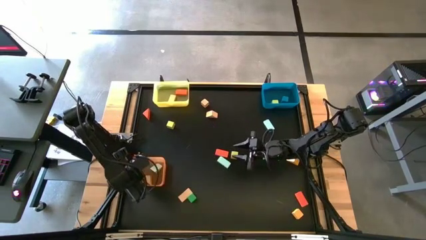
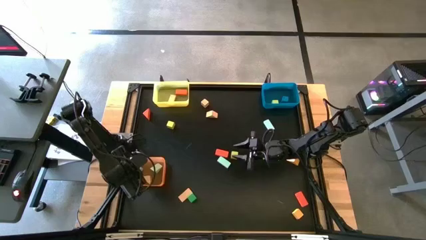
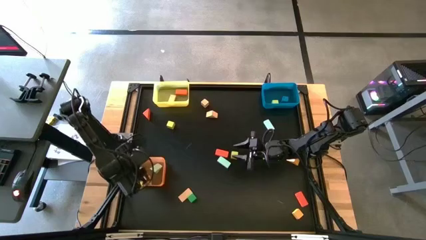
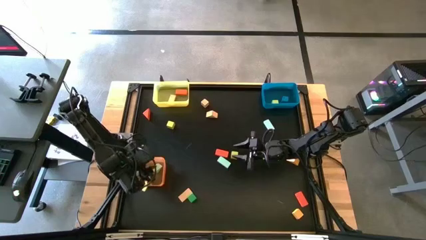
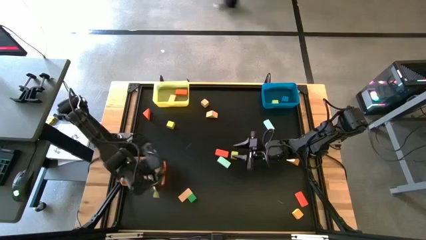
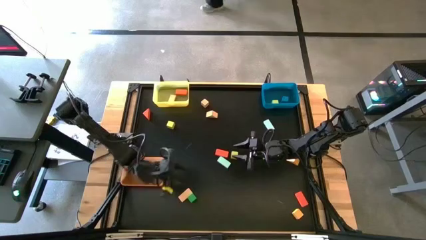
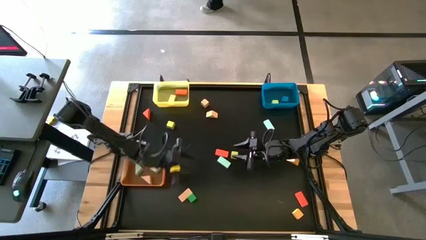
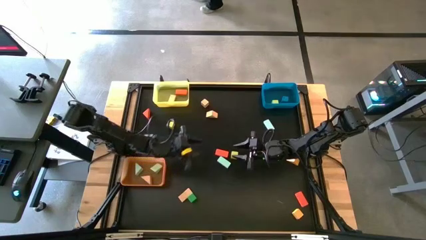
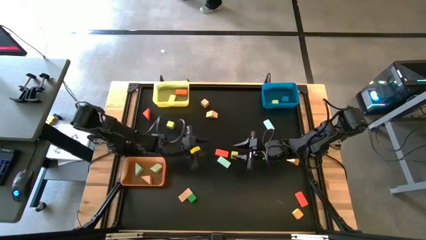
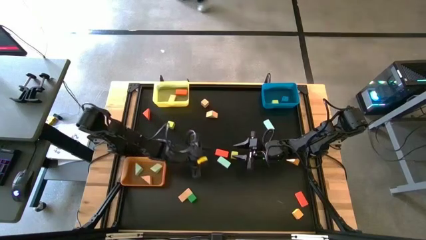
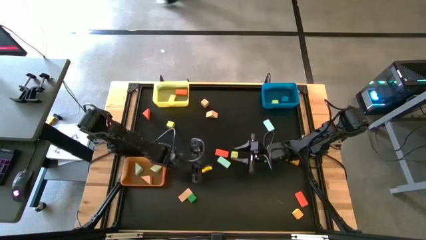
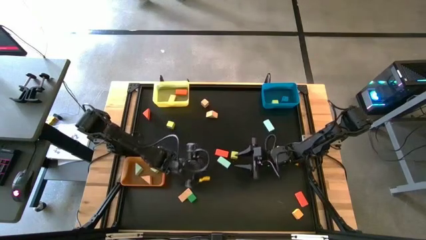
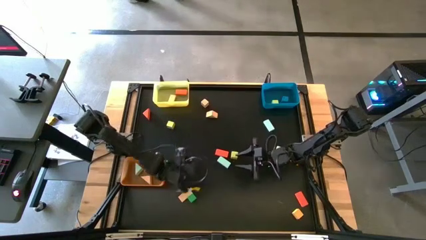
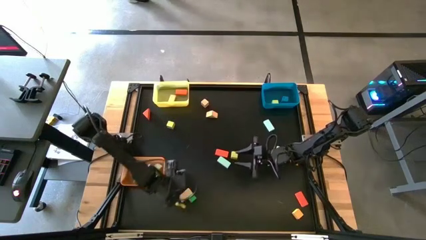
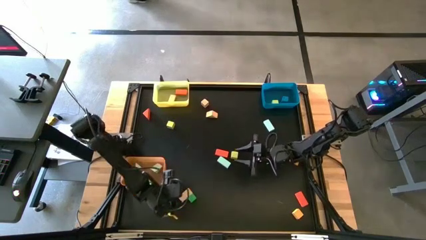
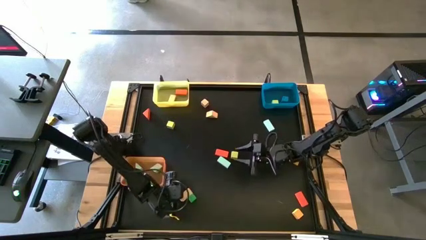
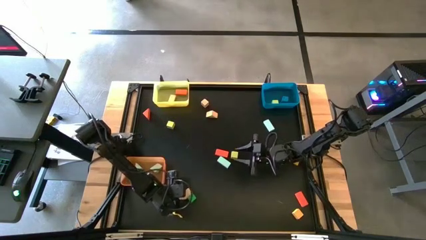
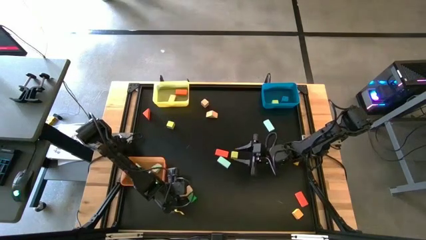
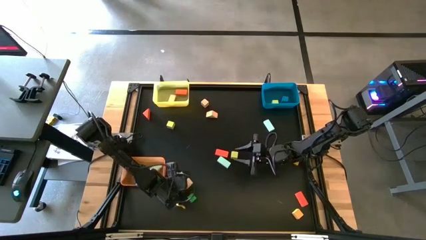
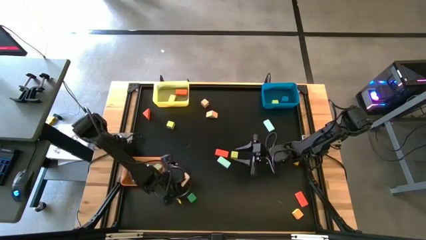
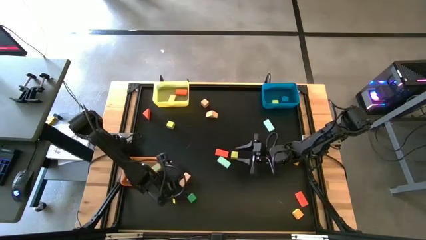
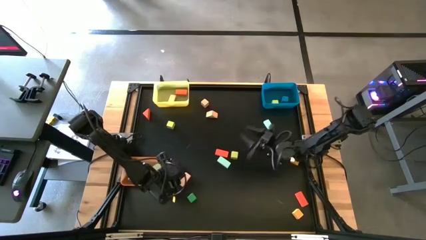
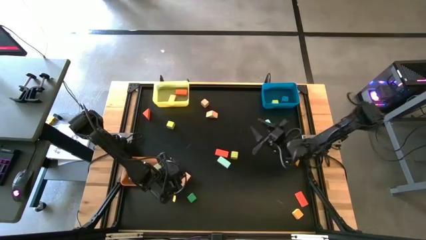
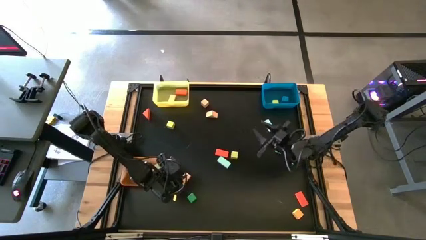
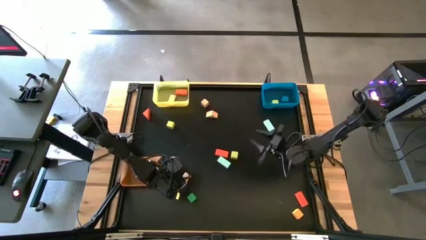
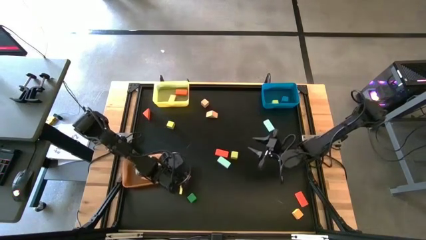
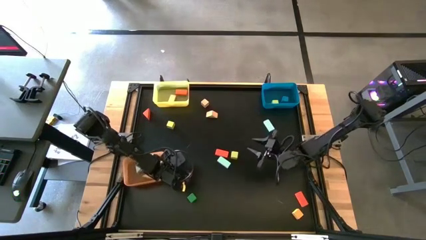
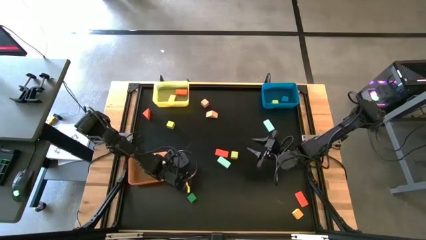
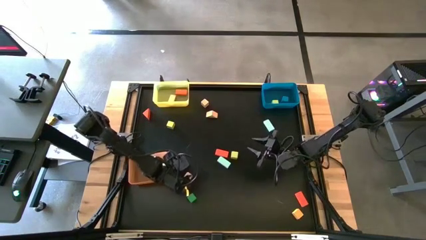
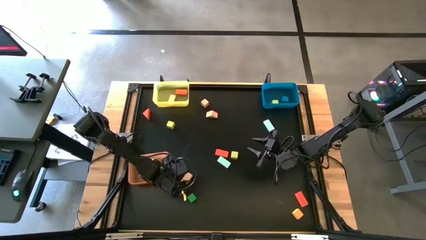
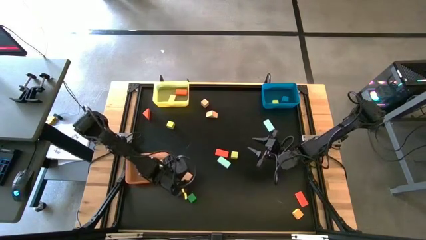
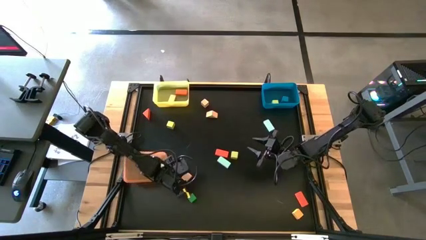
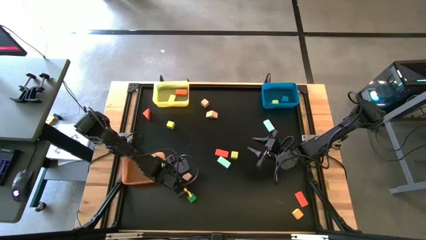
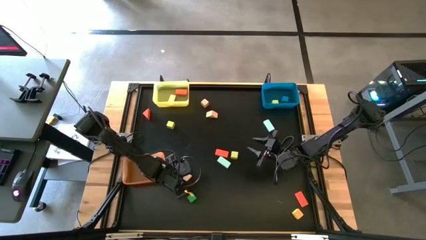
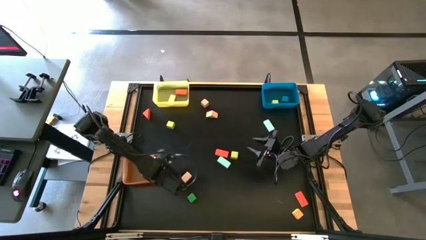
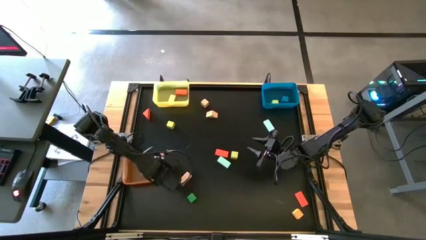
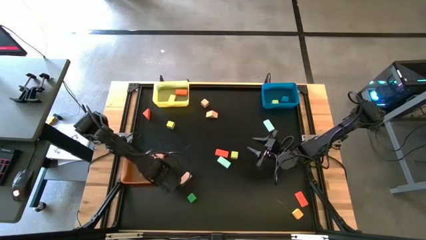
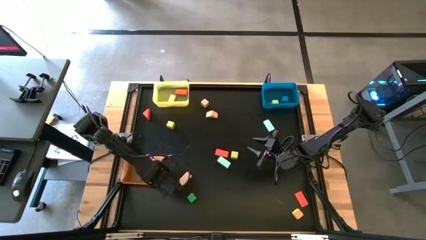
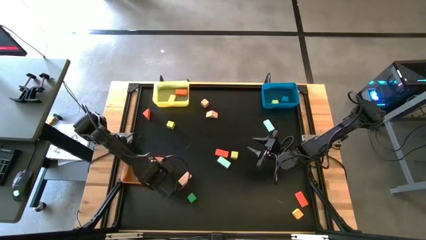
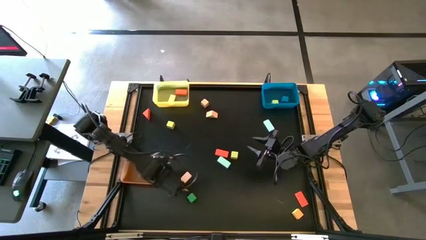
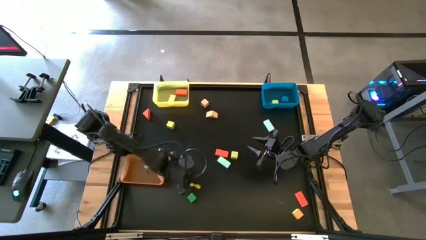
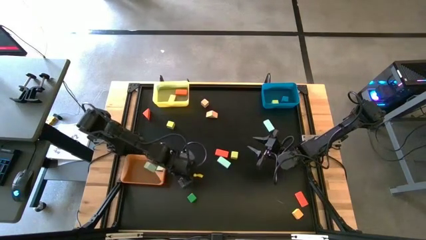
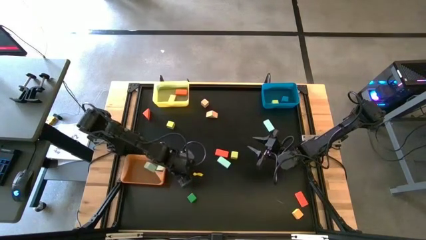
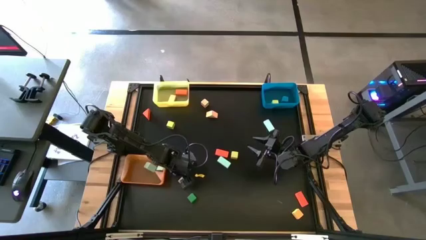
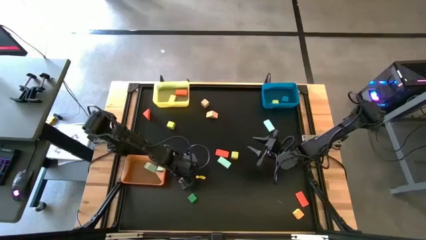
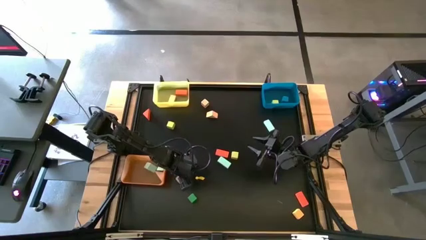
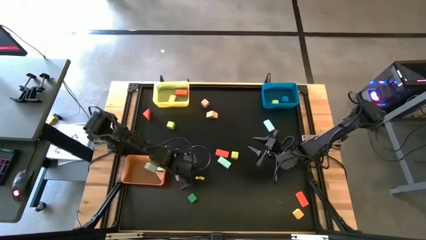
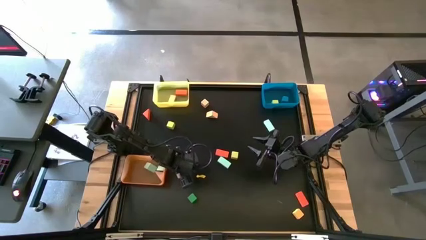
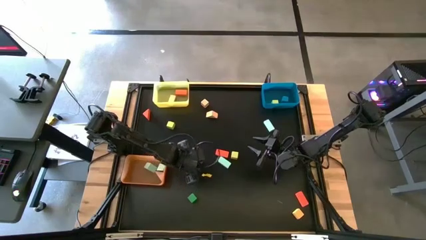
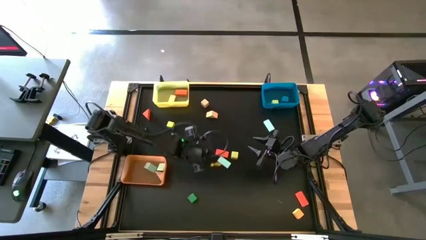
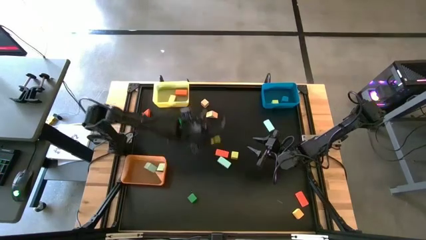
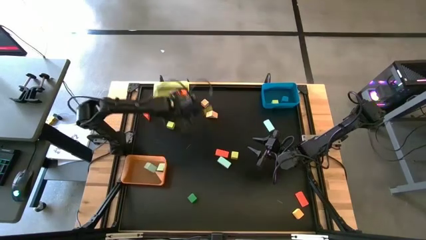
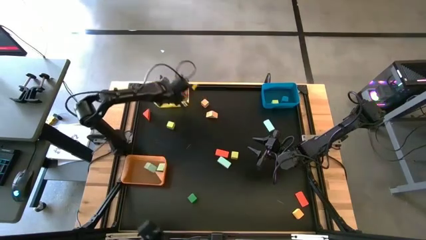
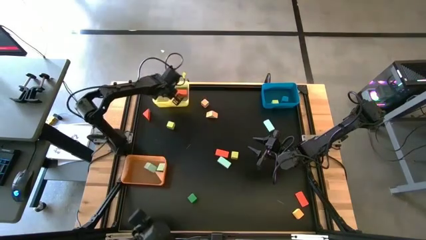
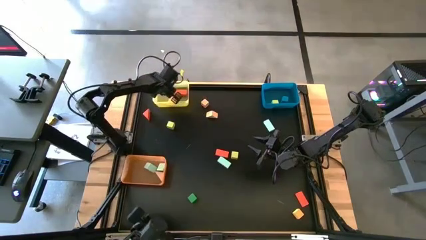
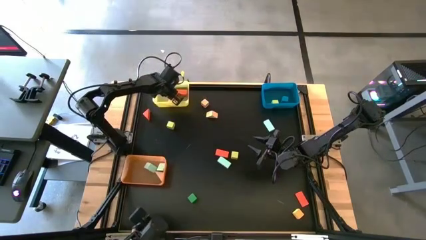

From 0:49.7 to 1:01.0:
Task: Sort blocks by size
Put the brown wooden block into the yellow bin

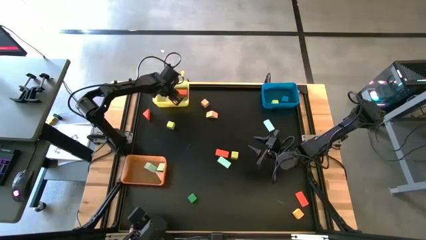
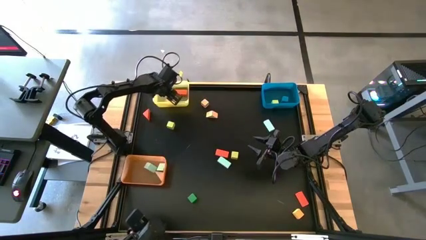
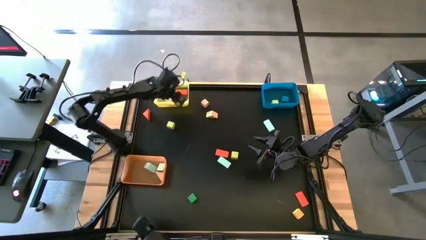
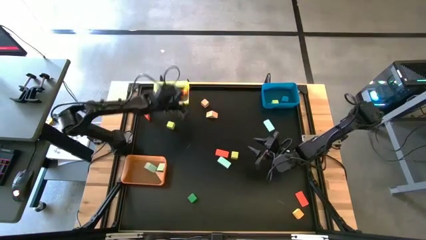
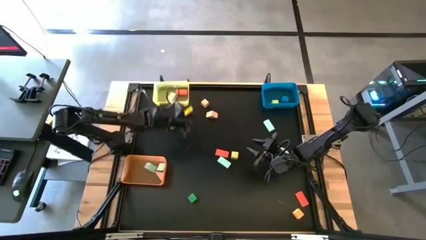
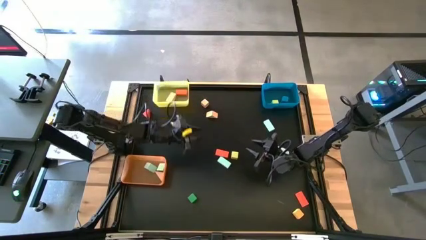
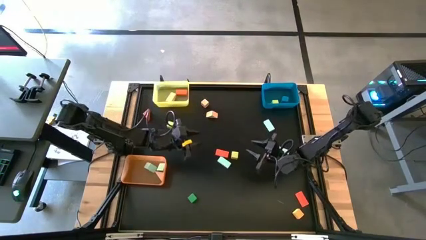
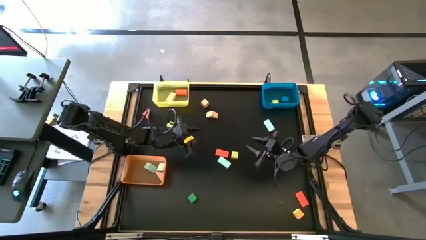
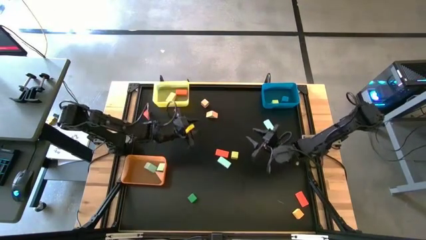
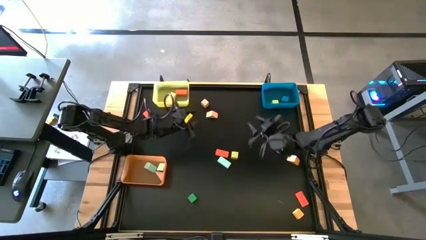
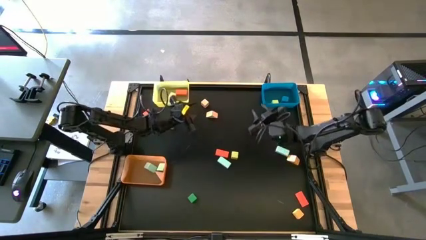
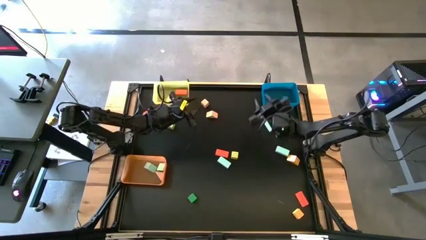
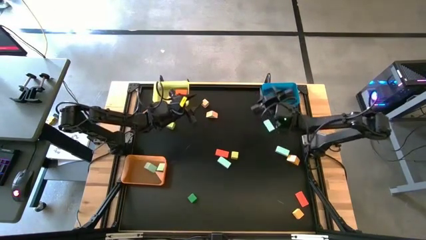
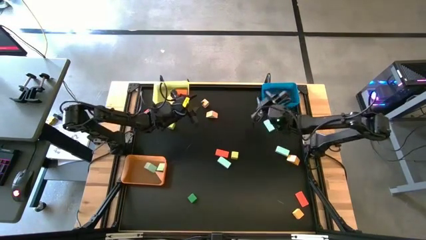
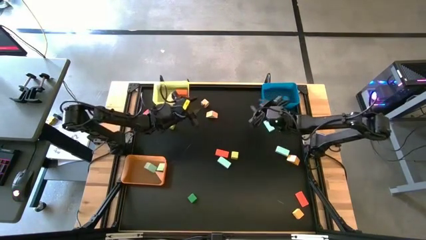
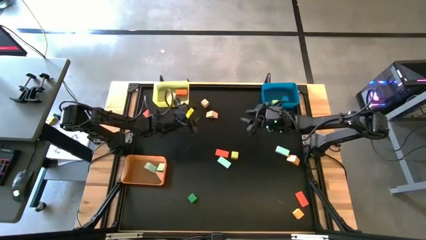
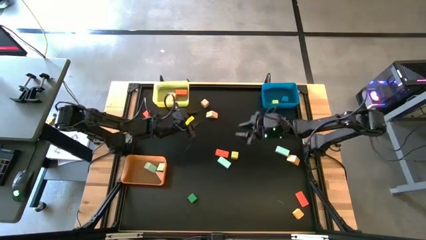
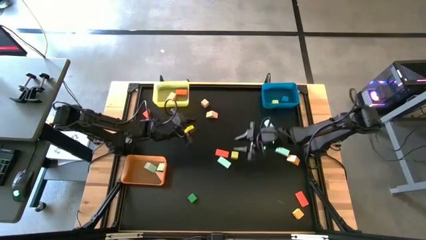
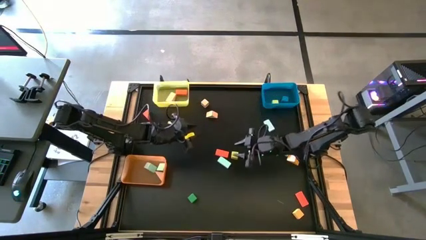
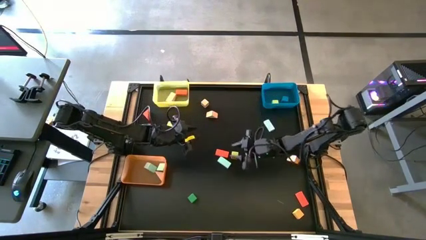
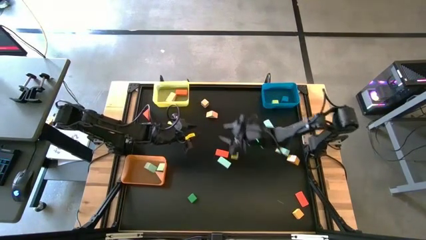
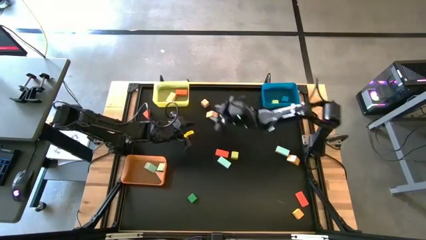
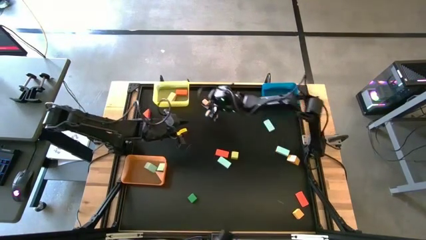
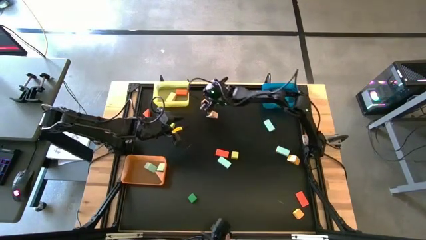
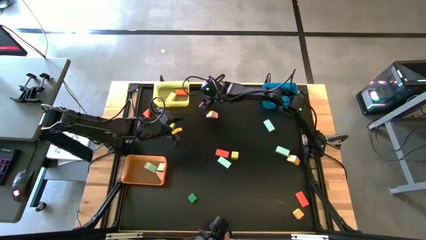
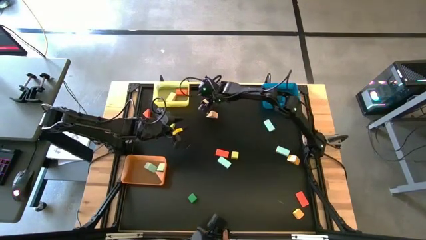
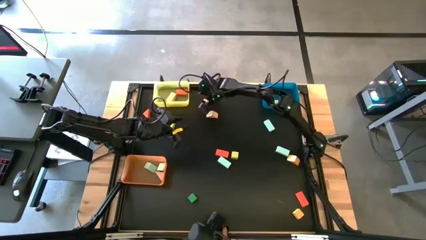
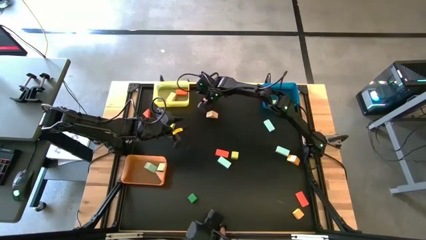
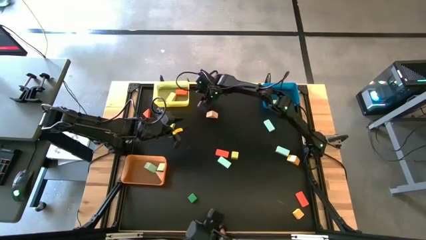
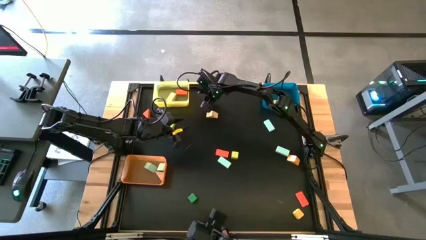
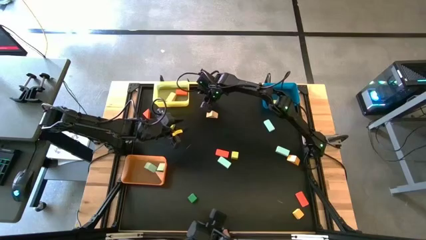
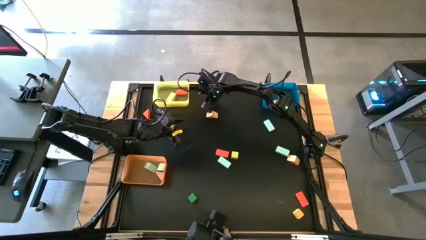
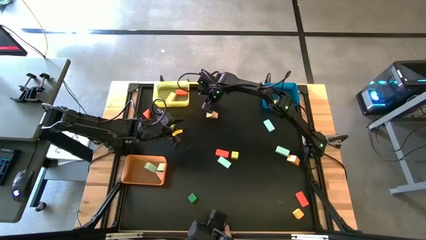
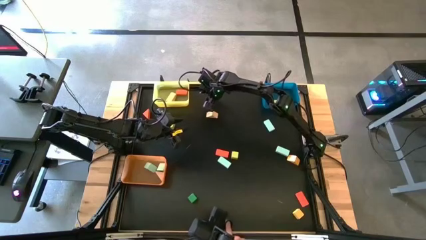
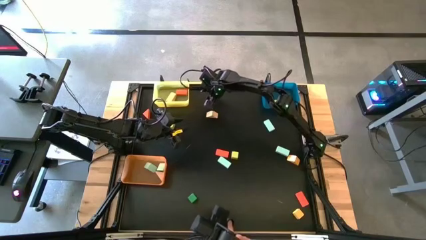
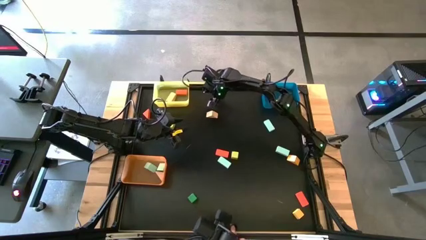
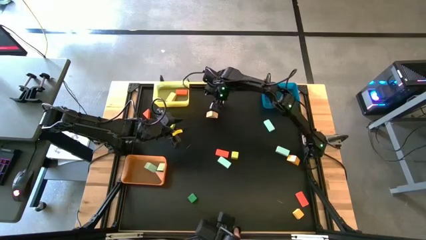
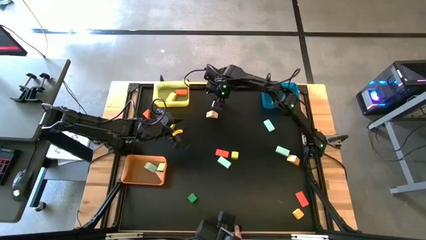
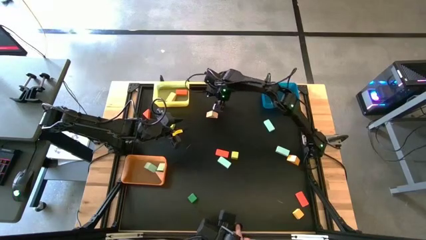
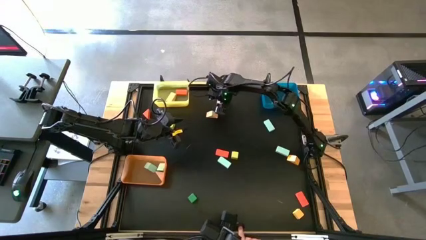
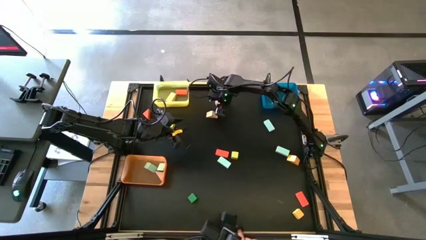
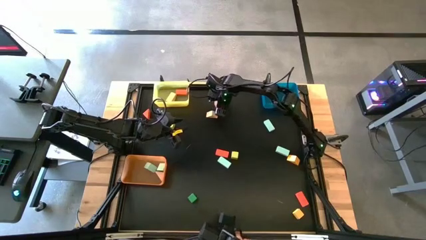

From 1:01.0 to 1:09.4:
Put the brown wooden block into the blue bin
